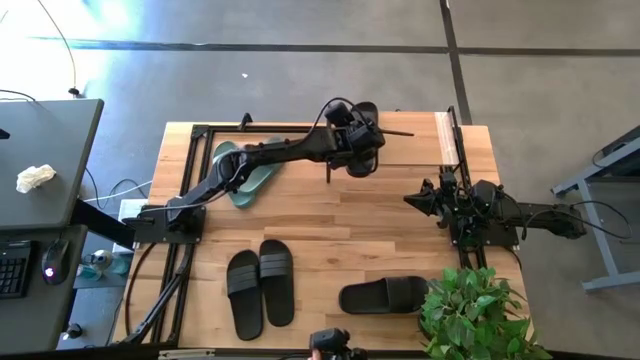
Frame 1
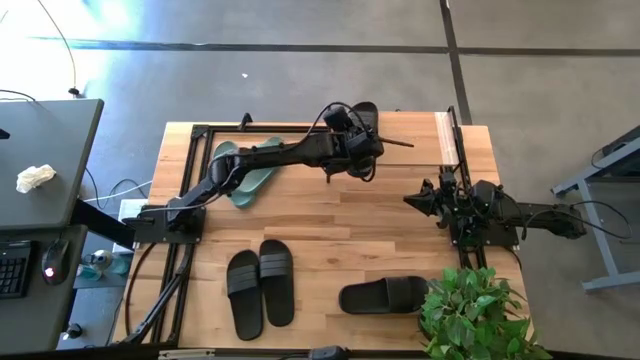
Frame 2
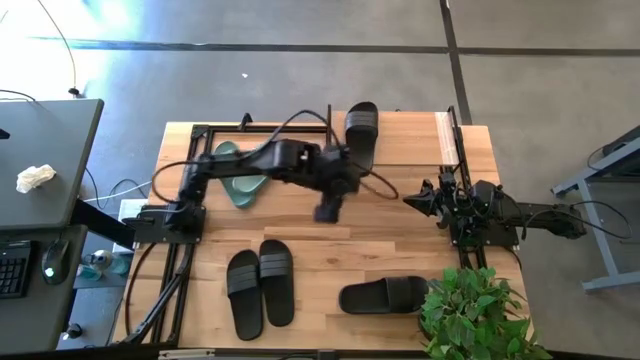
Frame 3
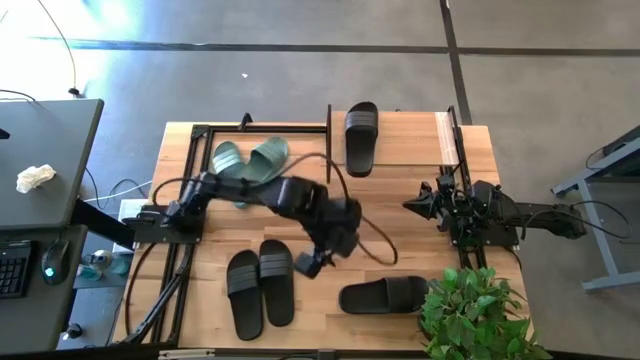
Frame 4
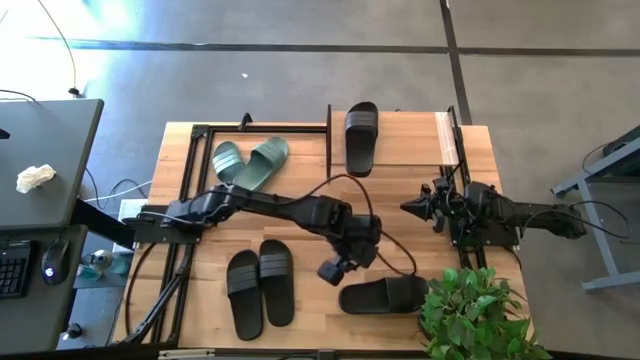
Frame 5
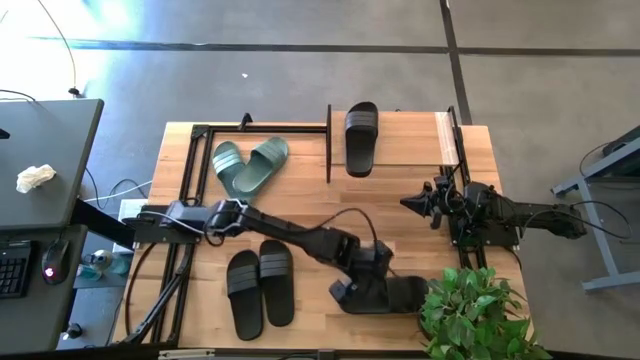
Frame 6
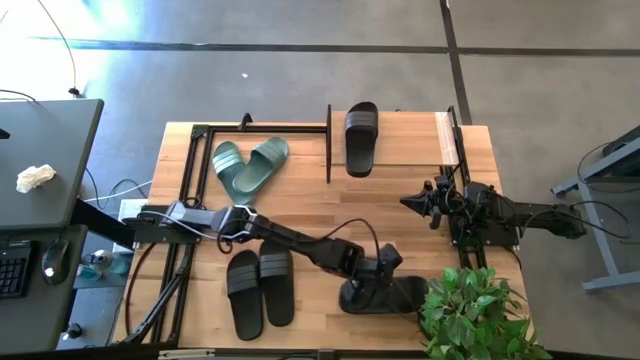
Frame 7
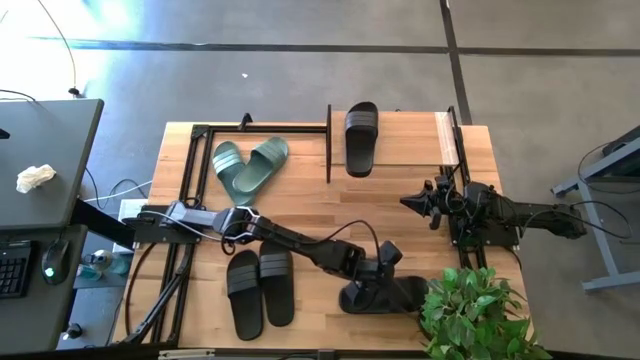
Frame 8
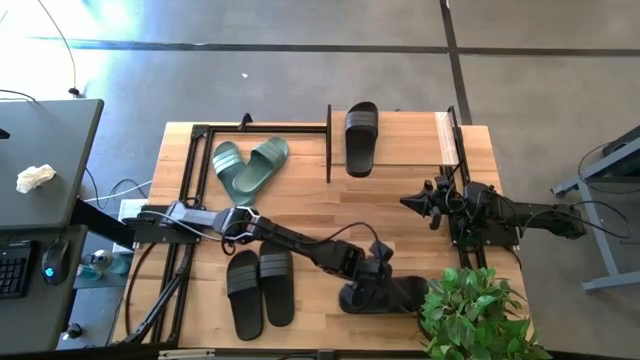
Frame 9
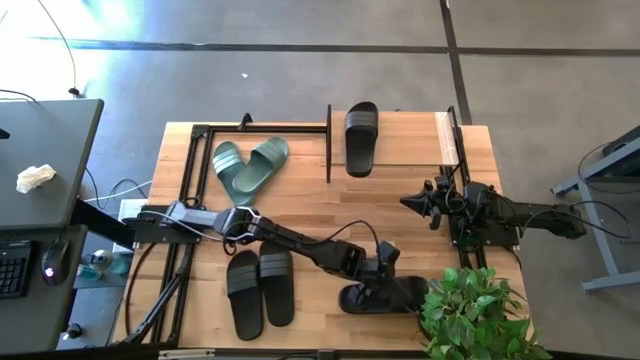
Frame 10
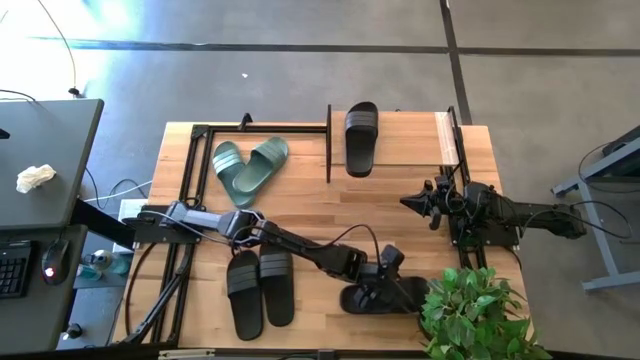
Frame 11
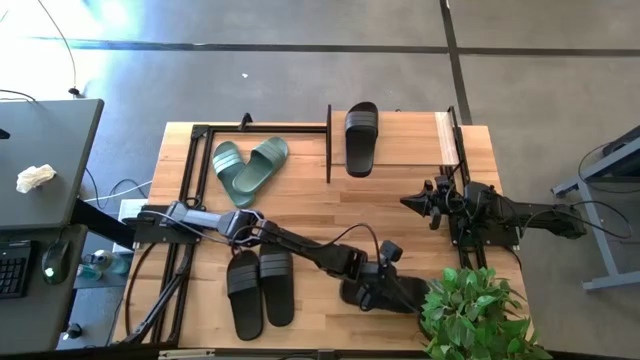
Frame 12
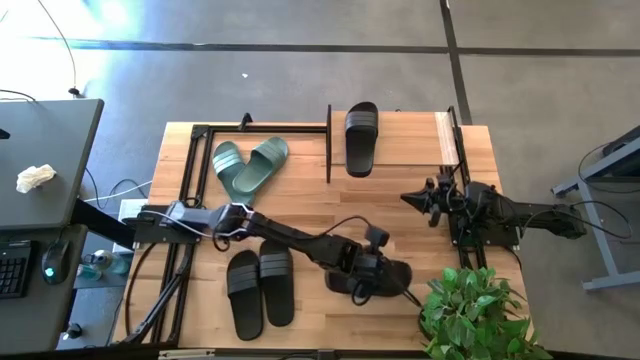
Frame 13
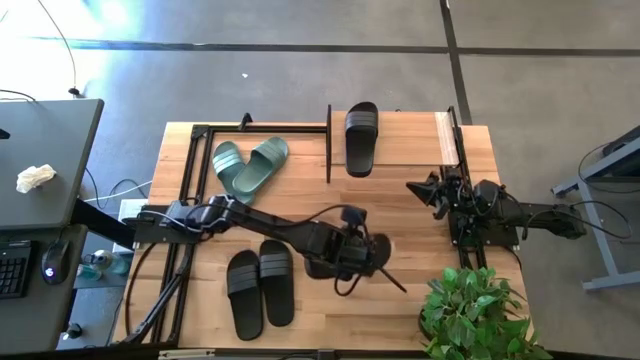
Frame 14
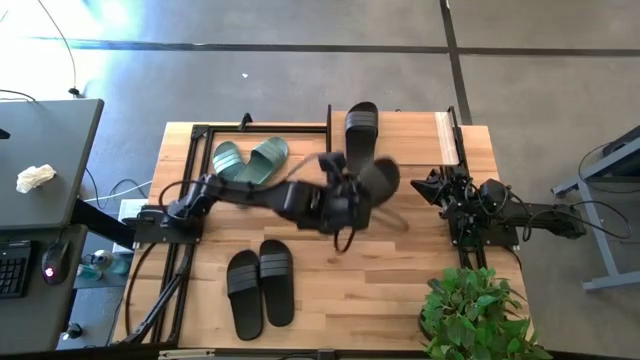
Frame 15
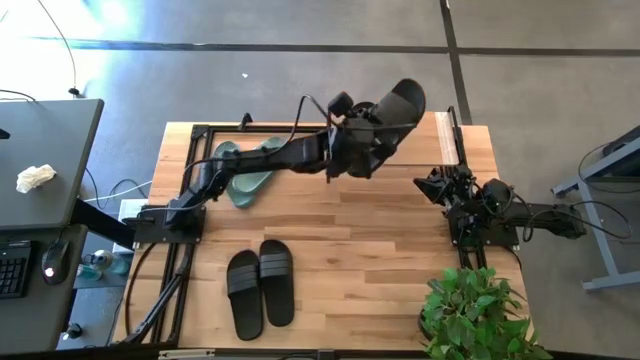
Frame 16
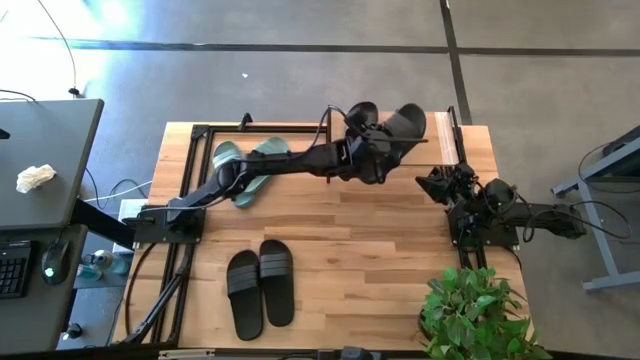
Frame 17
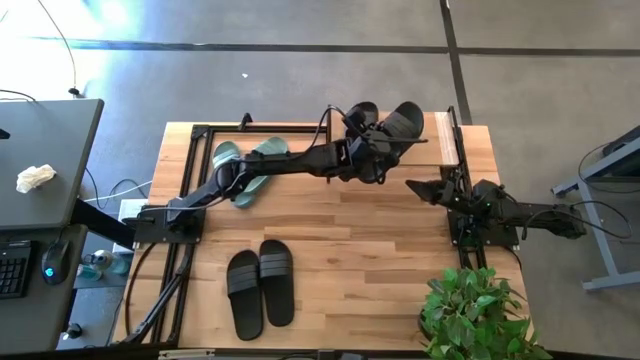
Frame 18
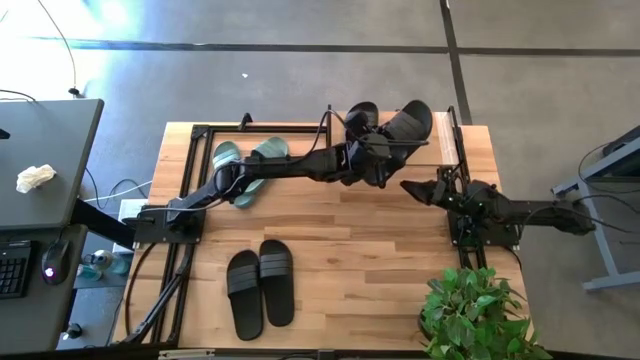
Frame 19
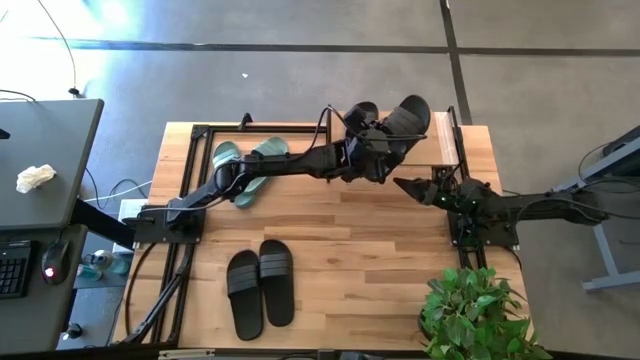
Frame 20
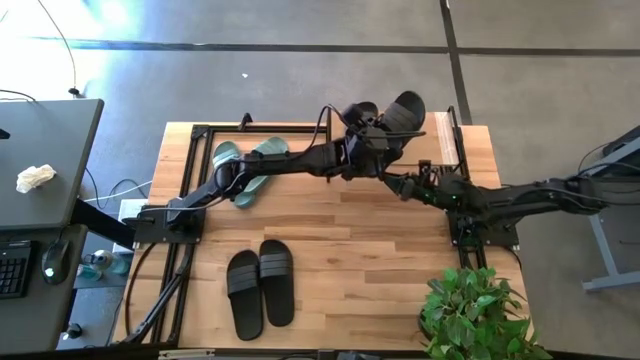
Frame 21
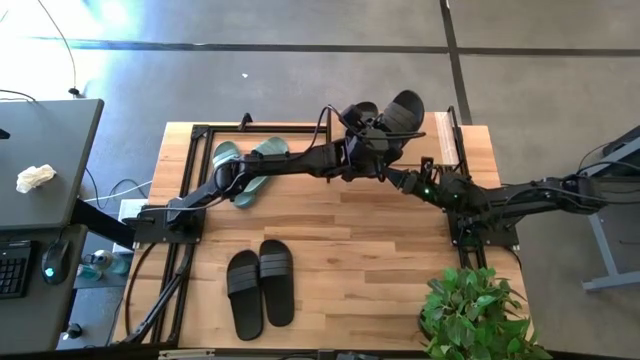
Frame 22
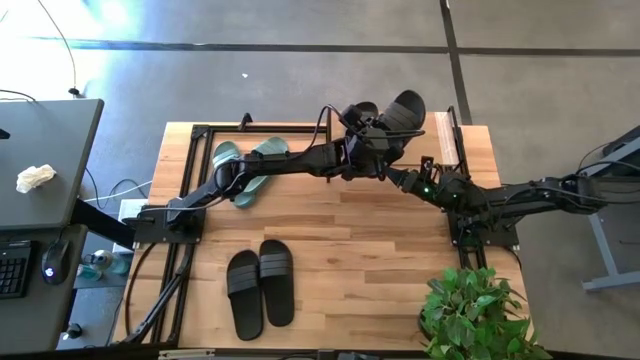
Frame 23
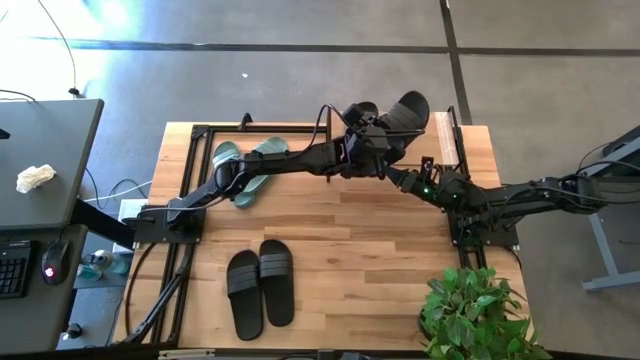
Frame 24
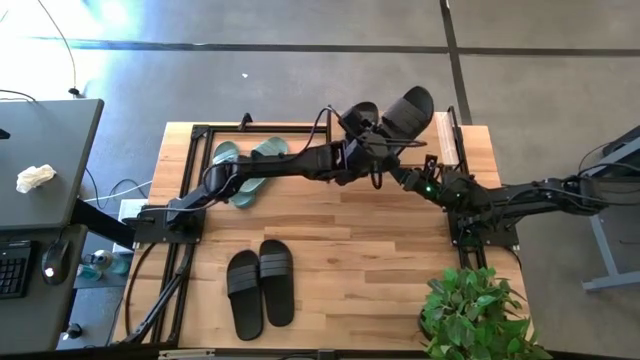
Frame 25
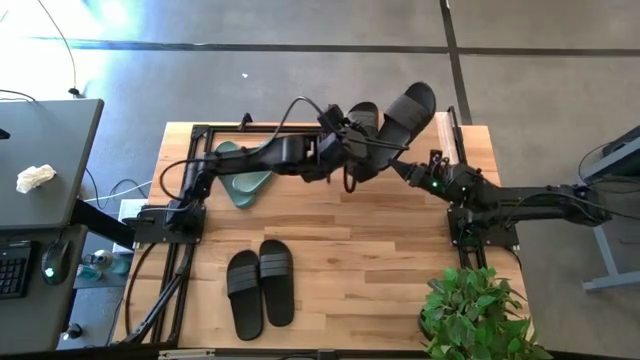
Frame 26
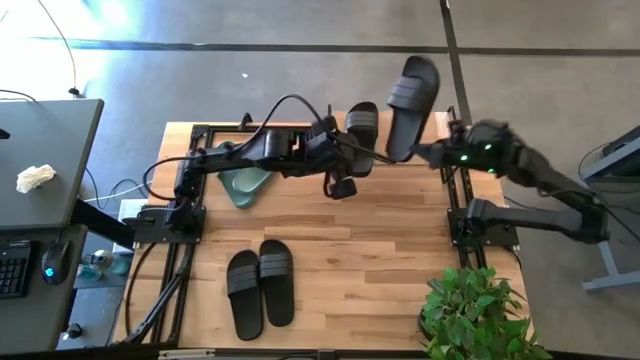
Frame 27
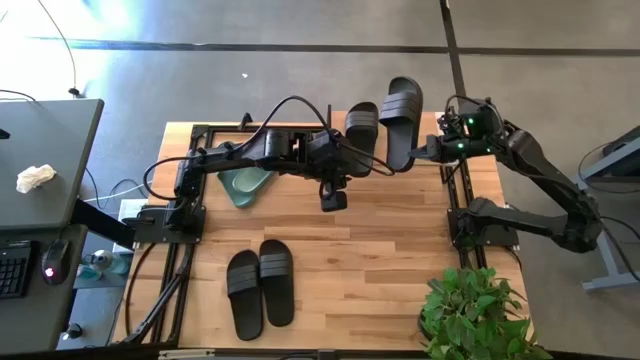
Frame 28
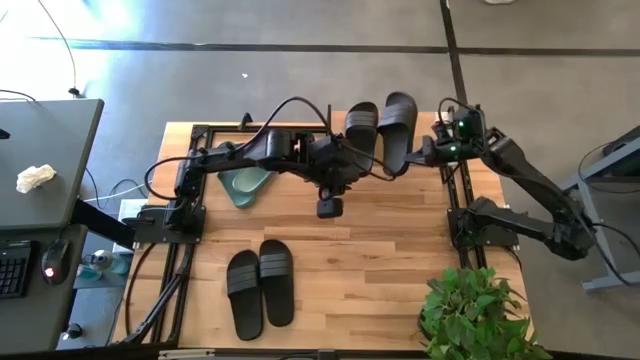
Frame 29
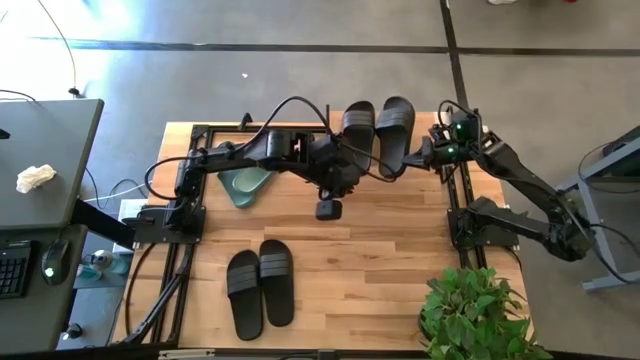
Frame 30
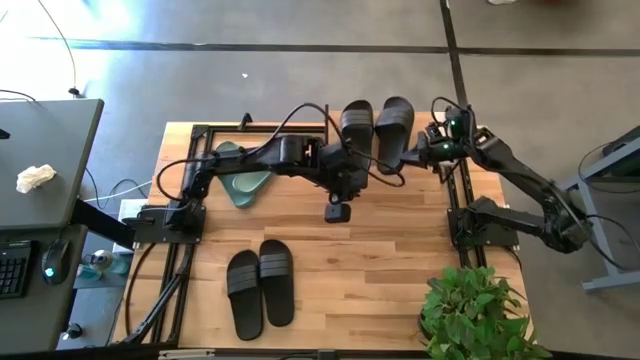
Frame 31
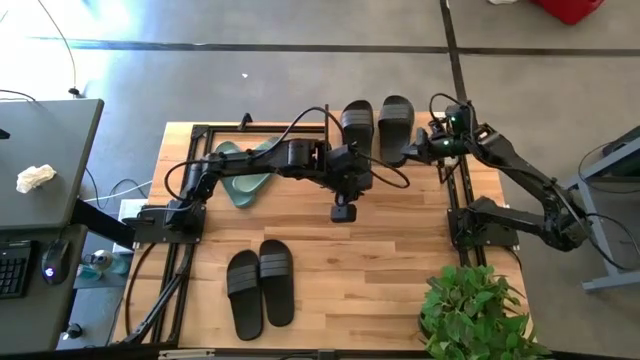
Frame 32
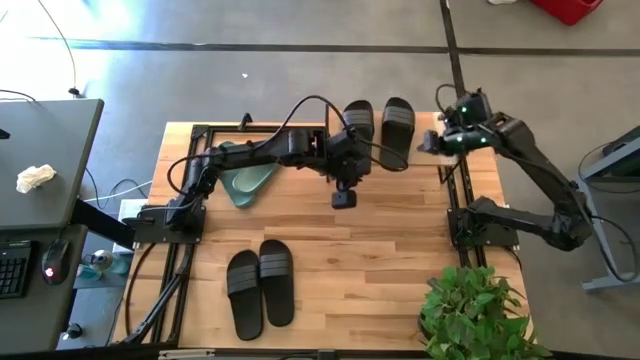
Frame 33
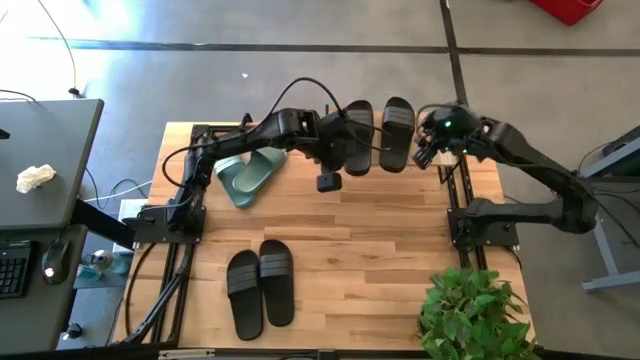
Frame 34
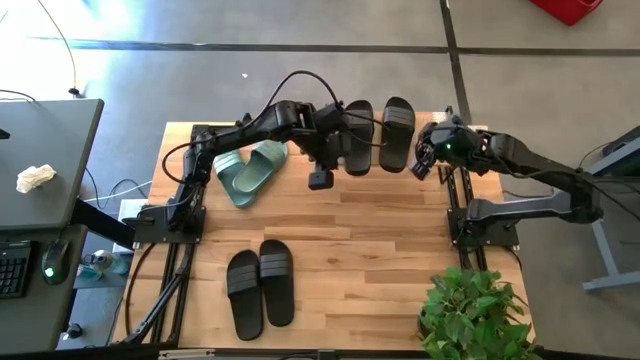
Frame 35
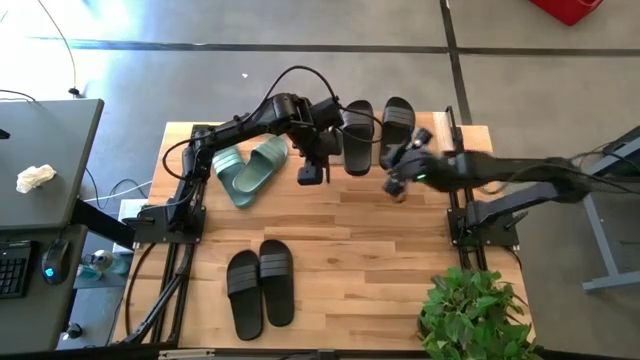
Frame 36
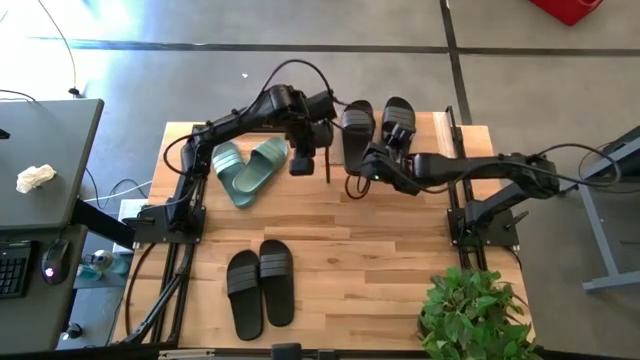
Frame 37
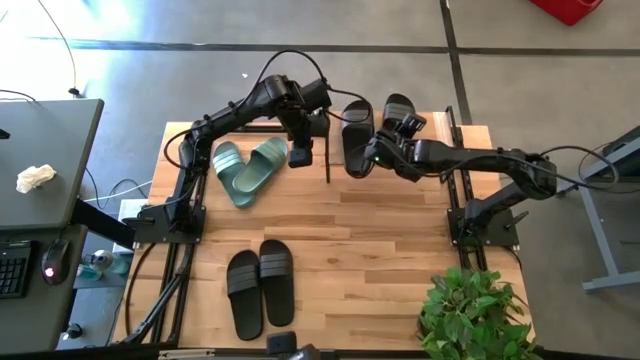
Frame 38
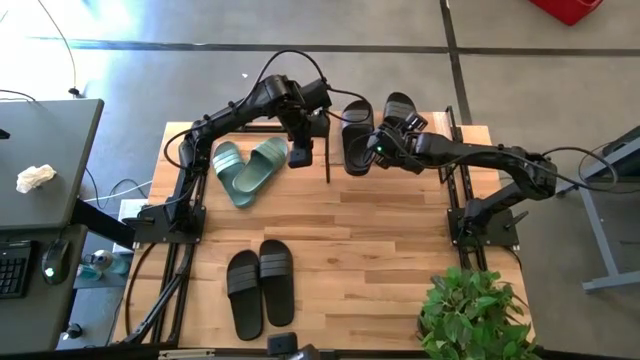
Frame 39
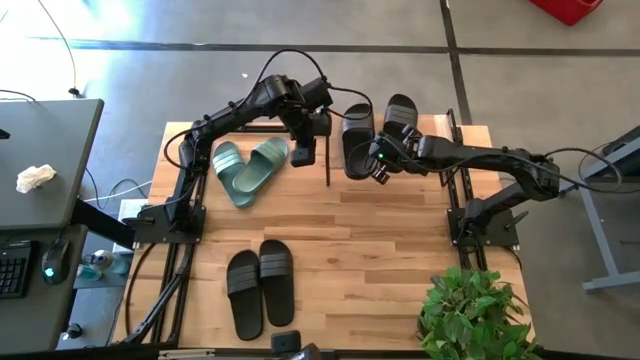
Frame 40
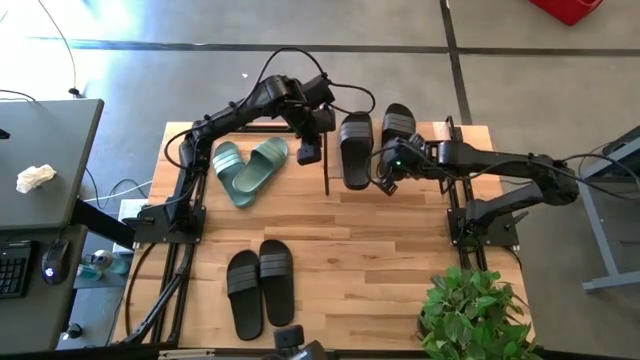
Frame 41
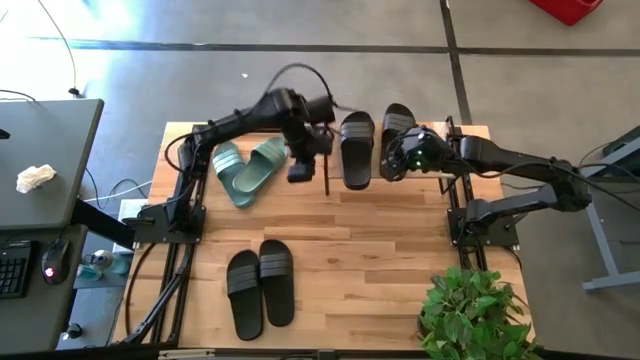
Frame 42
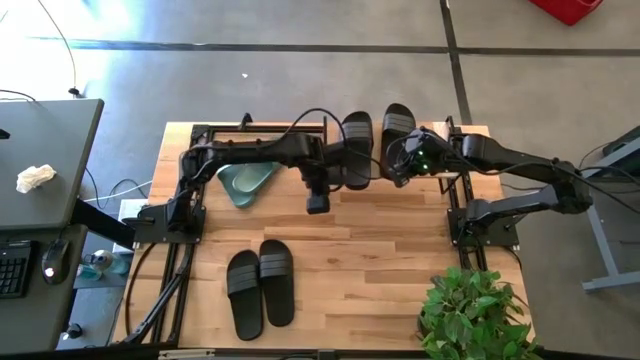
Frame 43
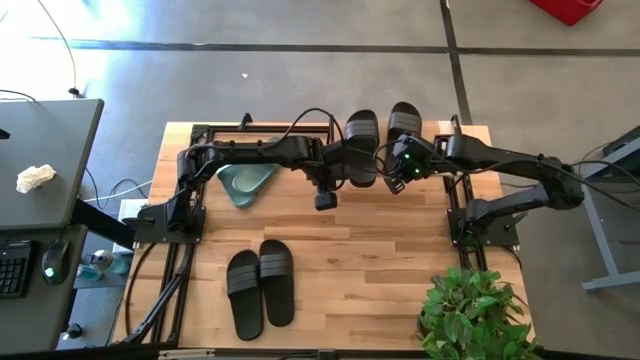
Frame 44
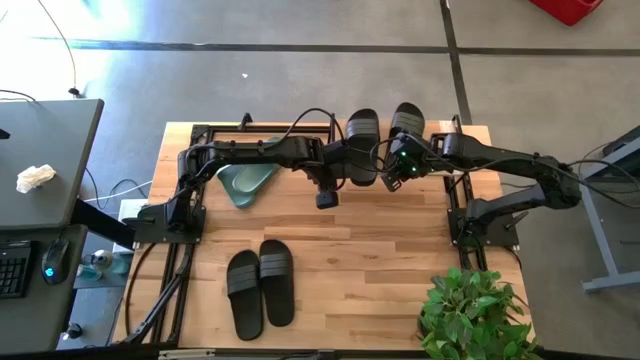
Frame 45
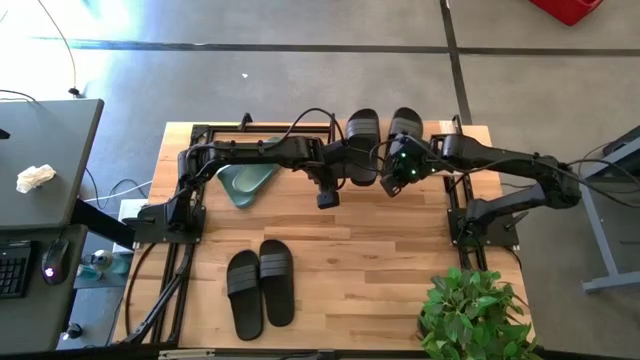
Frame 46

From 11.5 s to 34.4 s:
Task: Pick and place slides into the shelf
Put the black slipper on the shelf
